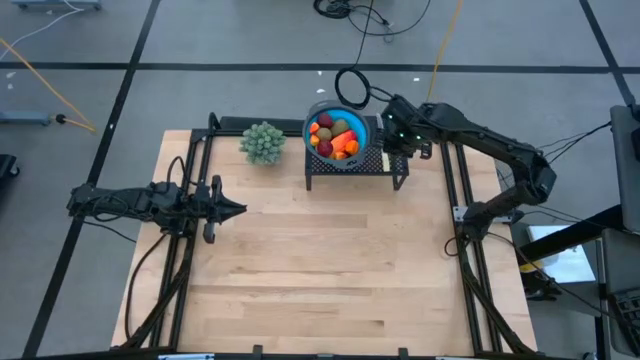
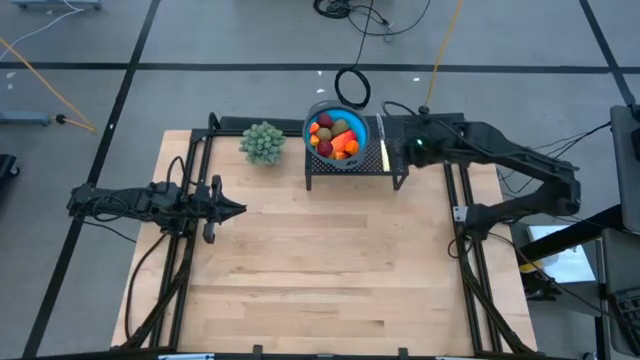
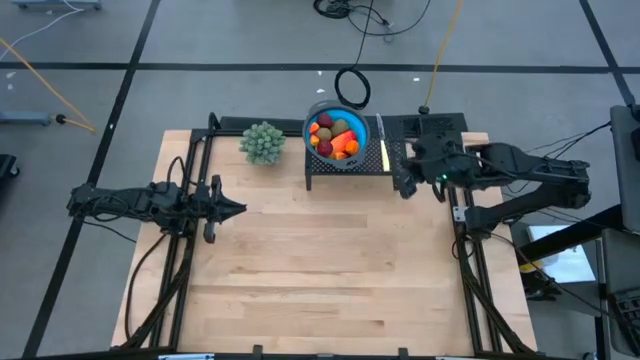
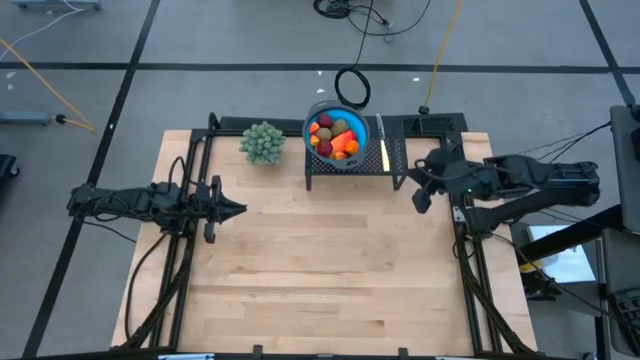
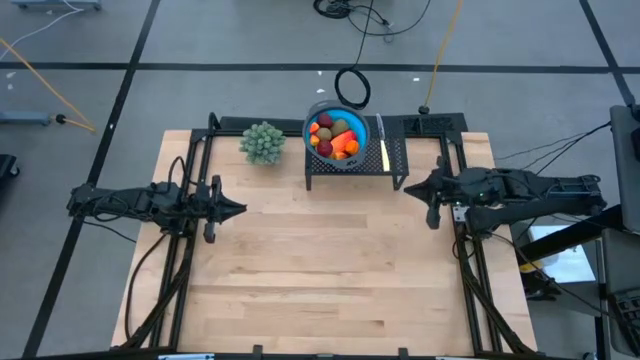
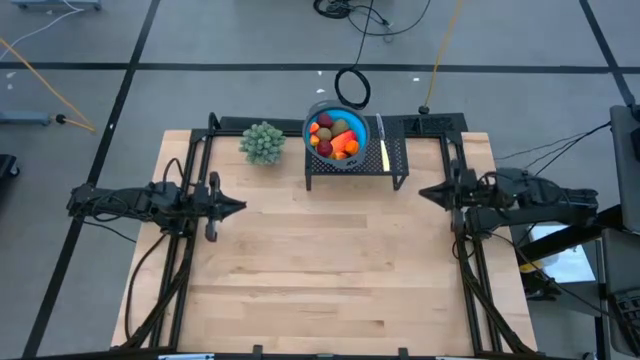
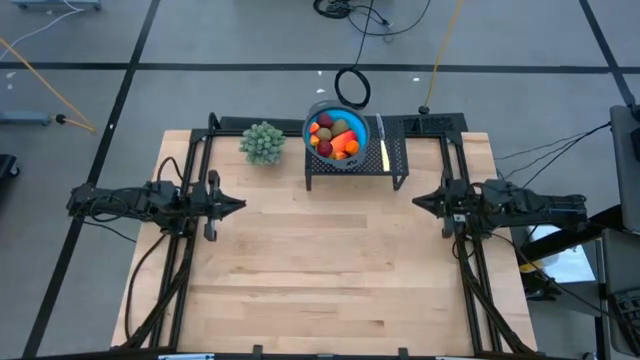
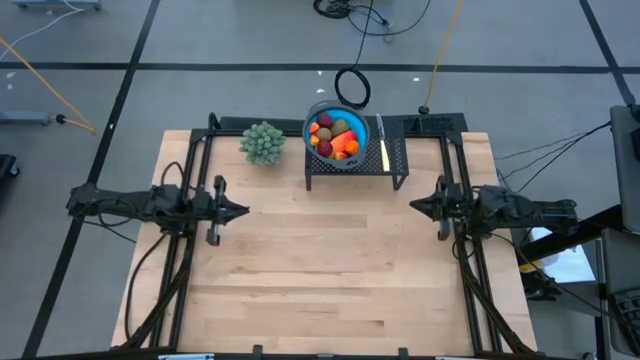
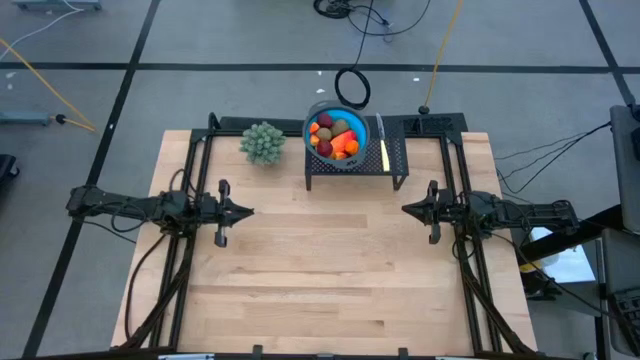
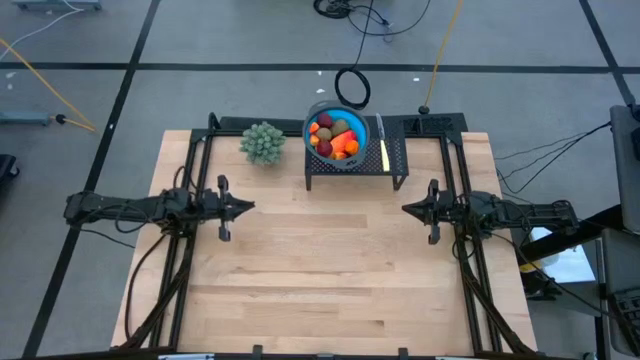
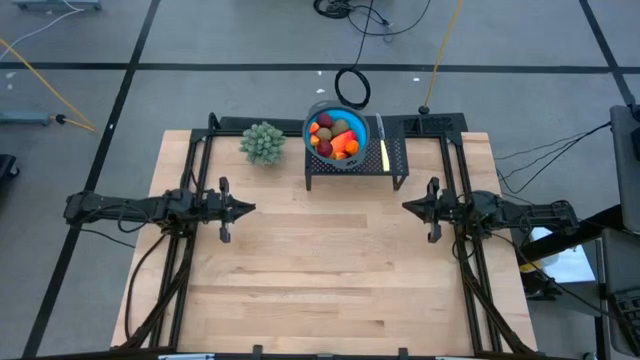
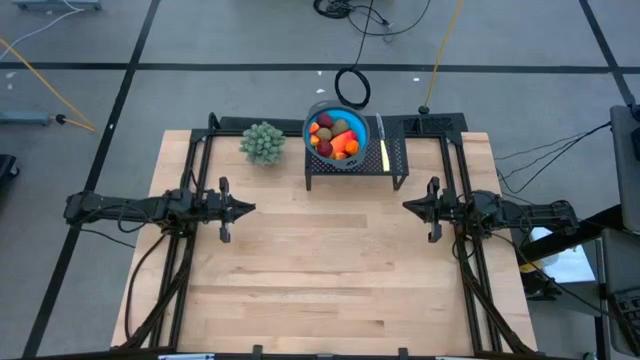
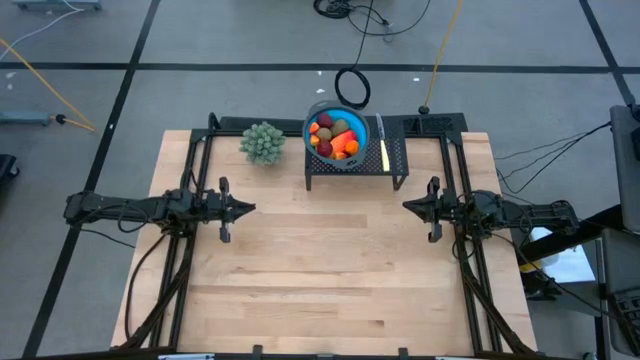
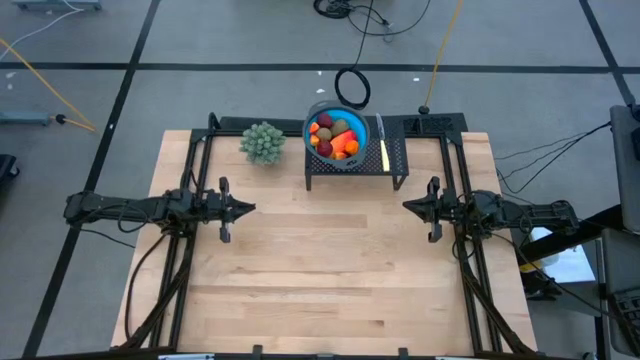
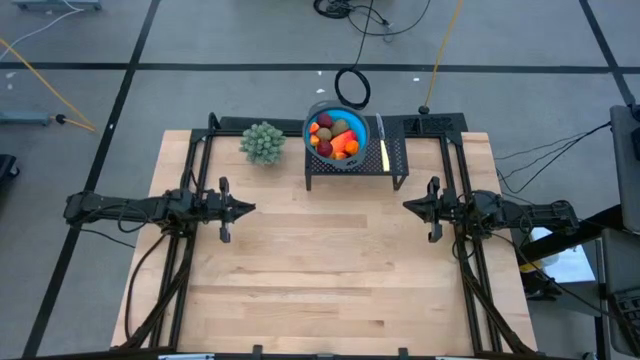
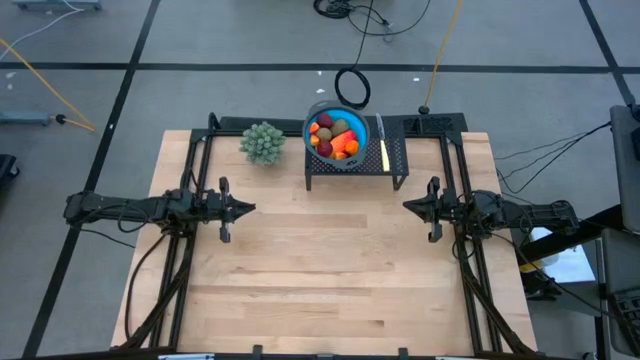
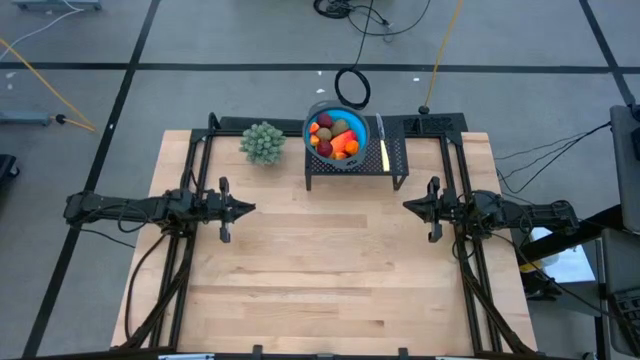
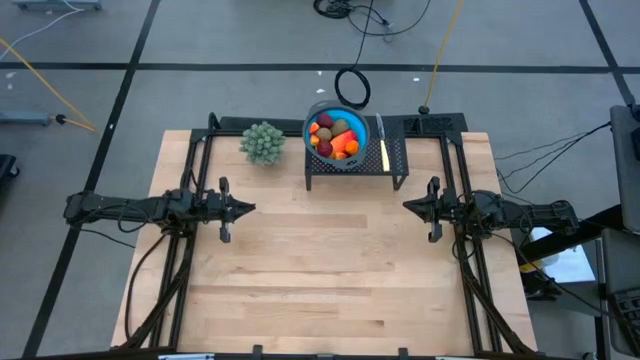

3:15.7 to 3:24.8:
Task: Pick & Place Fruit
Return to Home Position

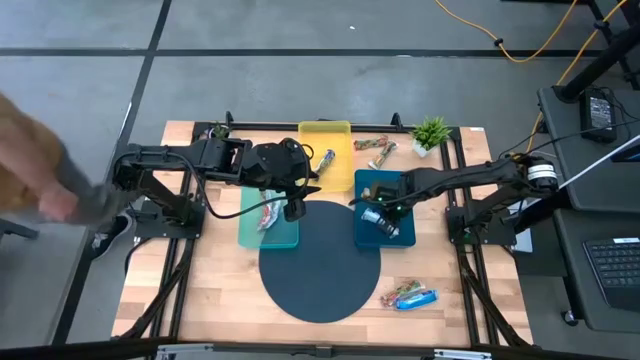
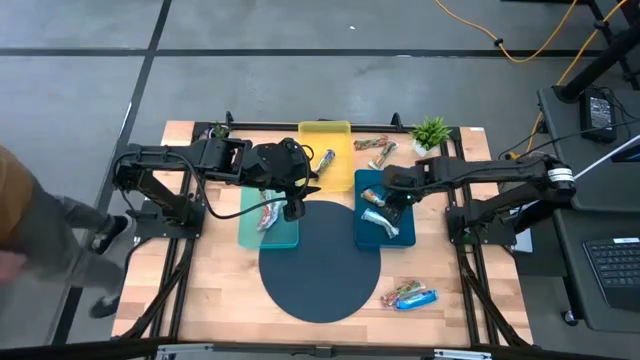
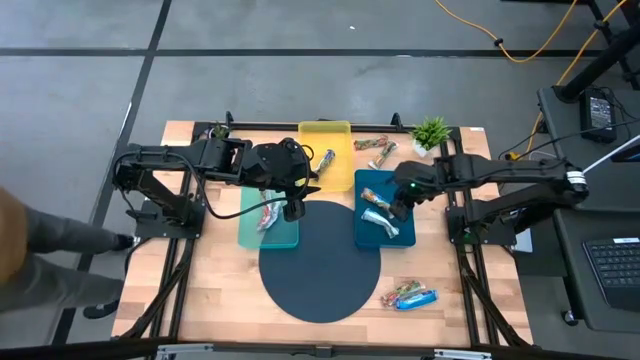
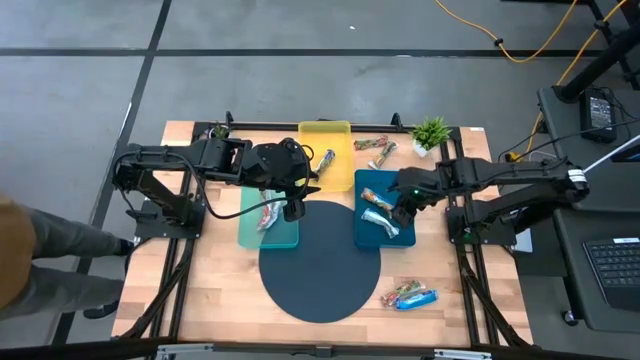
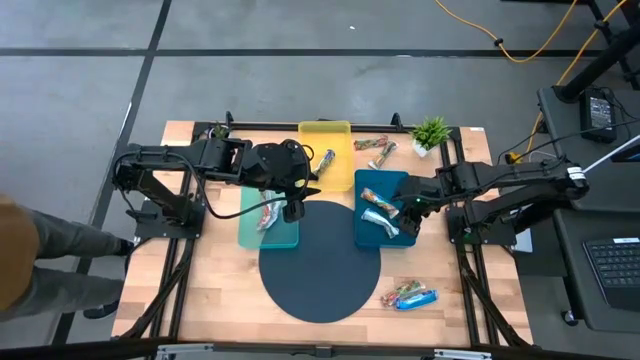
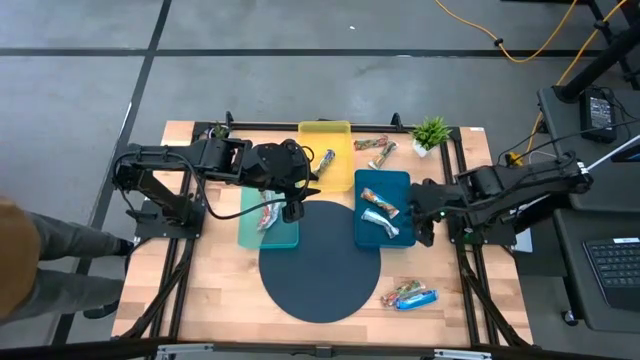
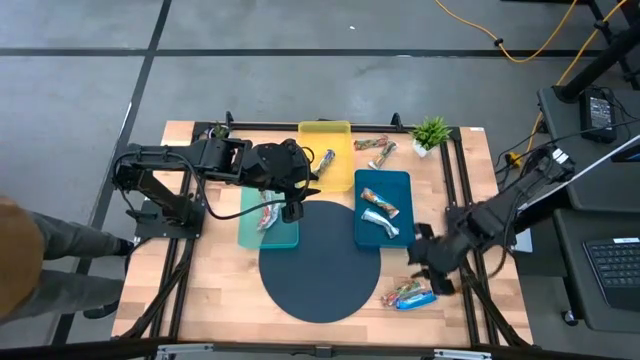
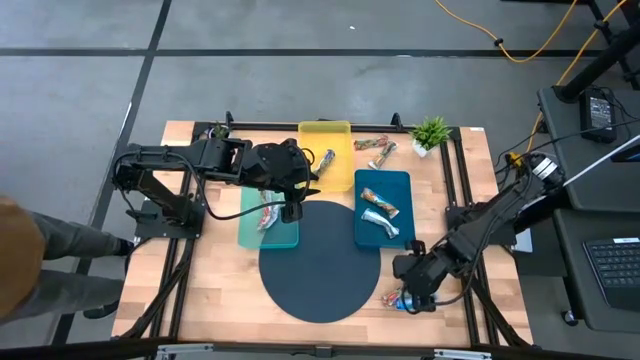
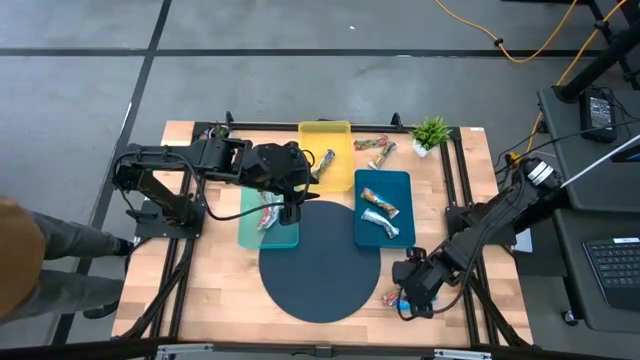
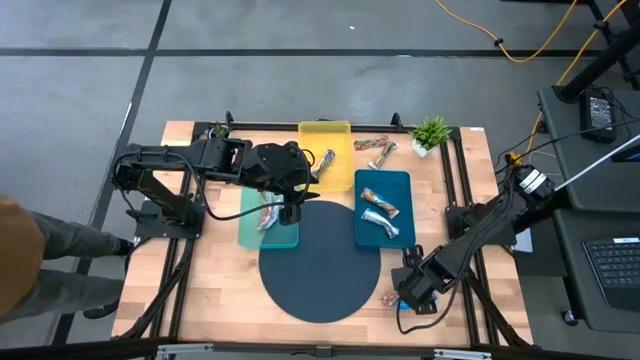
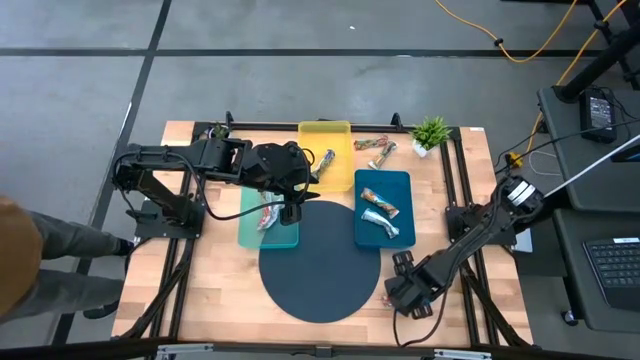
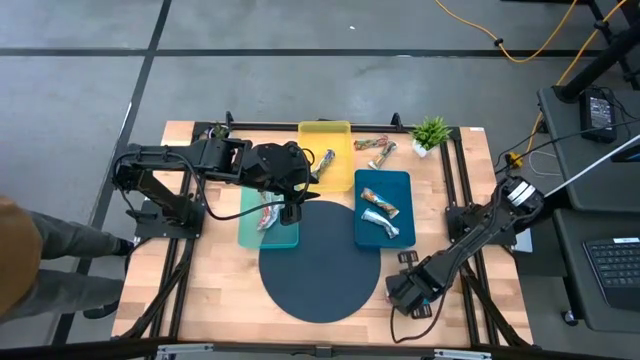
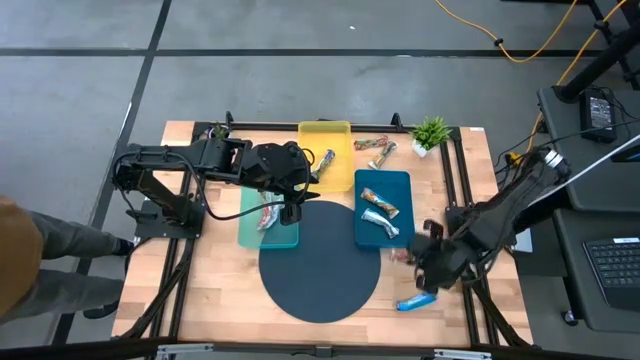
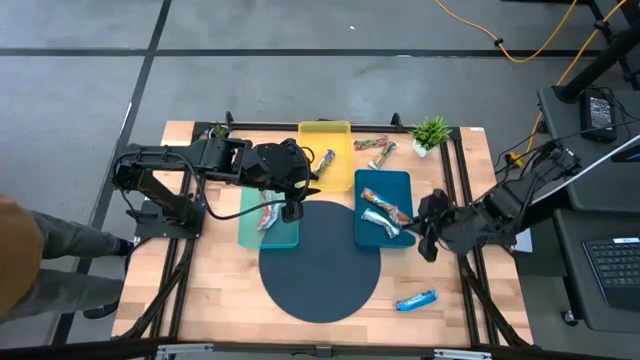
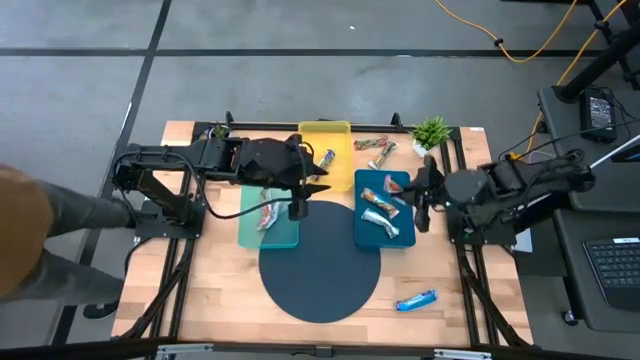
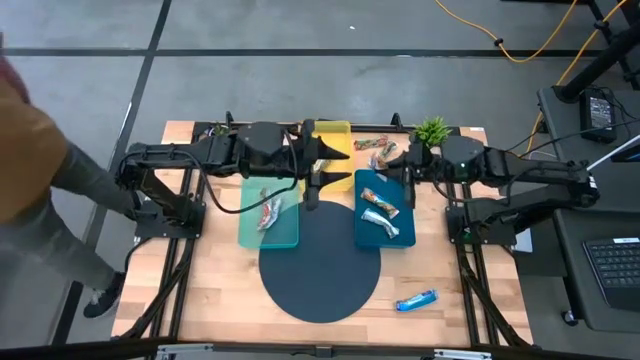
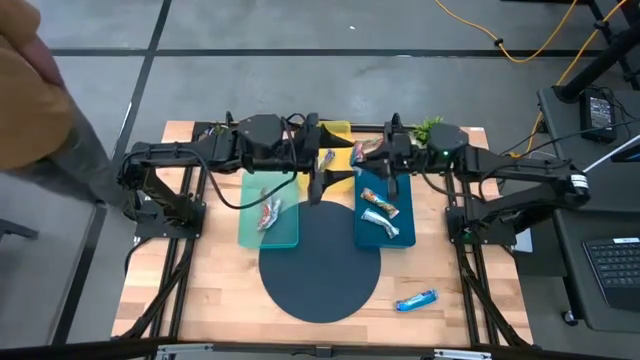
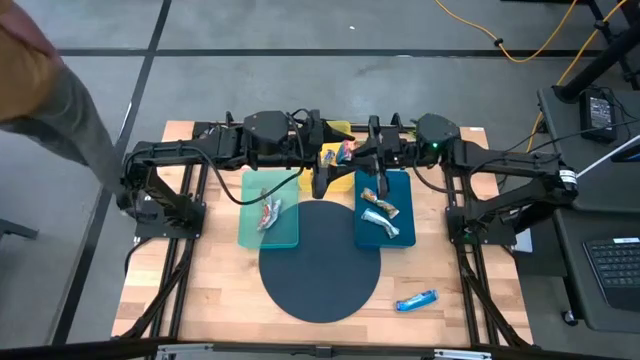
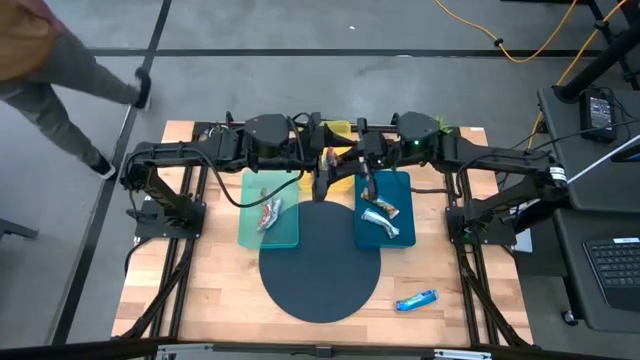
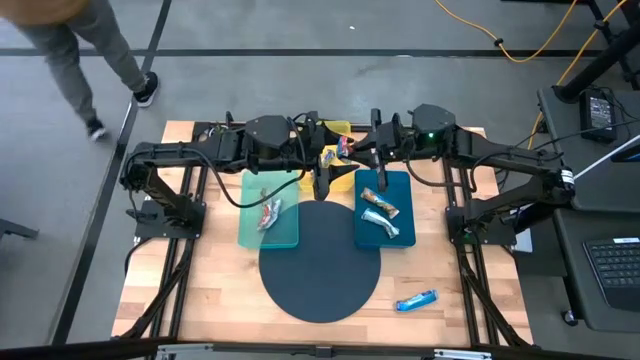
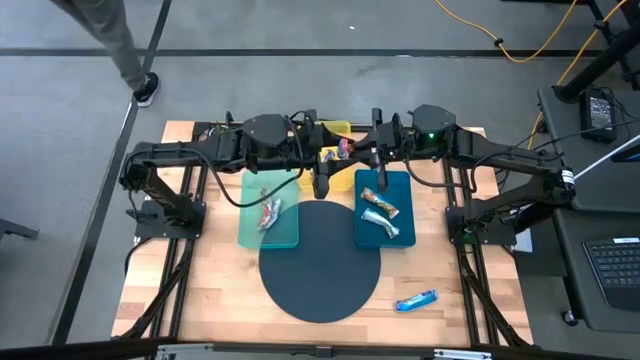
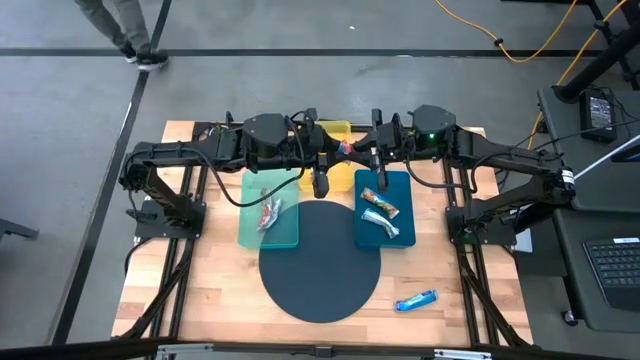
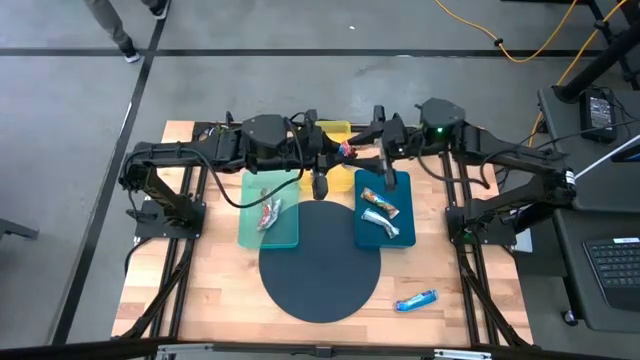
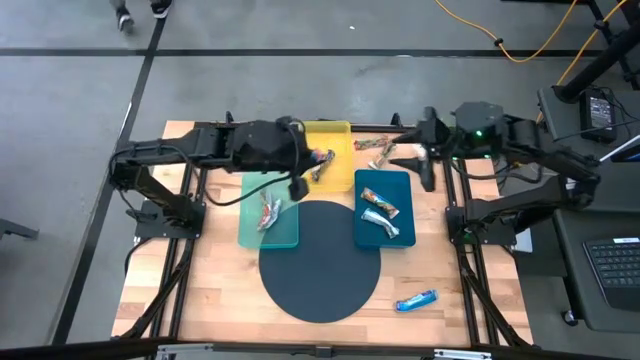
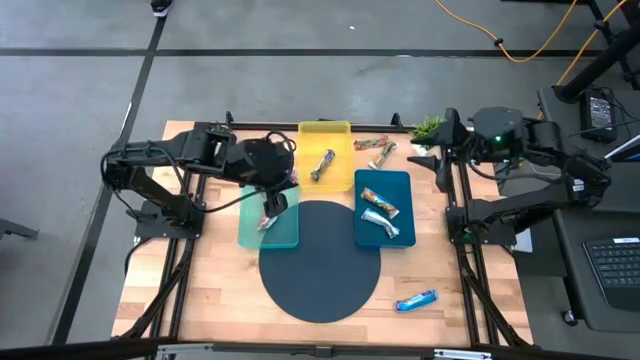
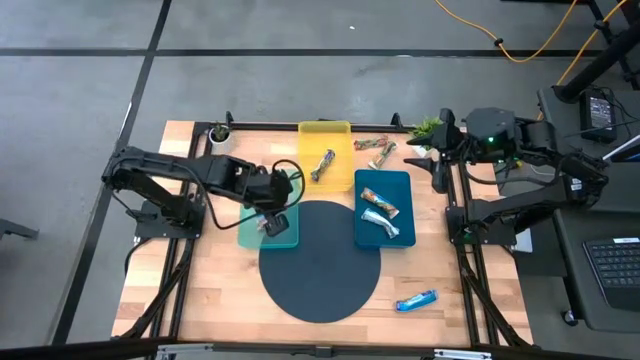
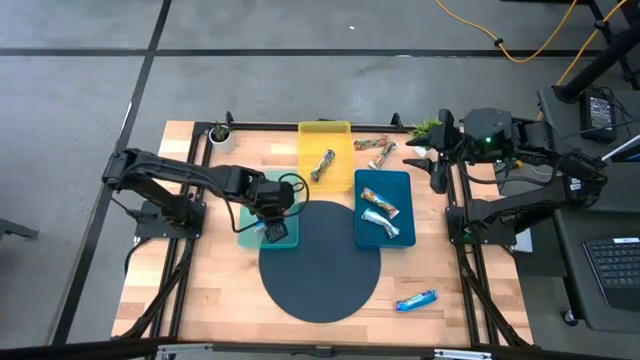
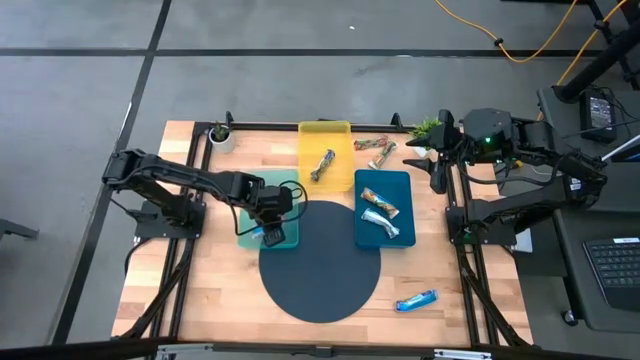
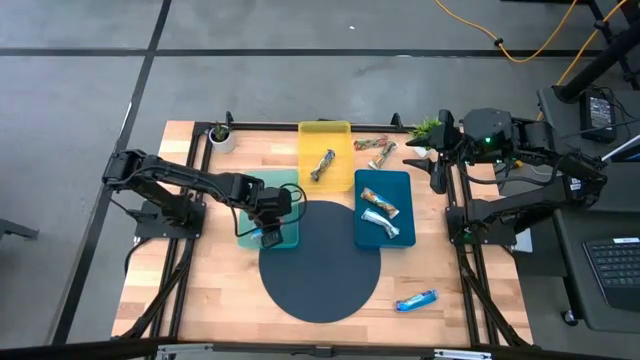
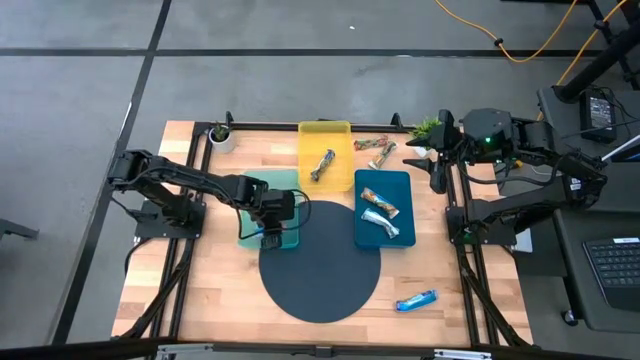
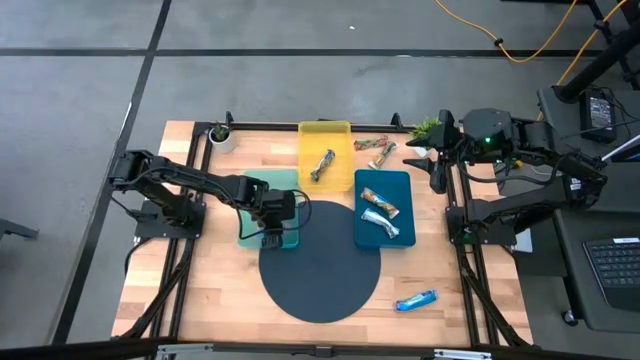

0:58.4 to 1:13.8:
Task: Pick and place Granola Bars by type
Put the red granola bar into the light blue bin
